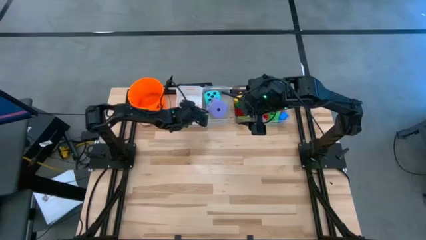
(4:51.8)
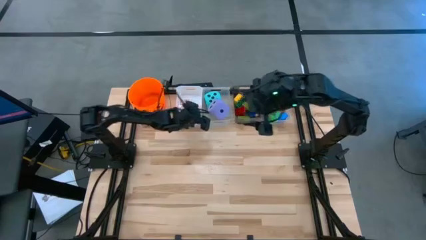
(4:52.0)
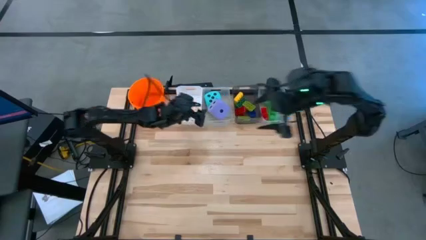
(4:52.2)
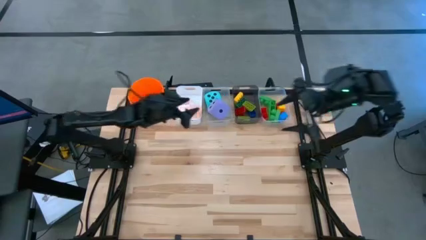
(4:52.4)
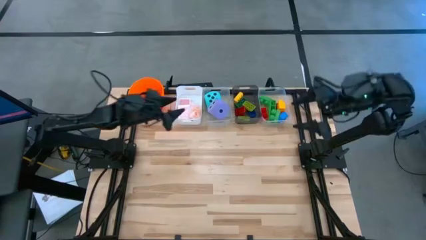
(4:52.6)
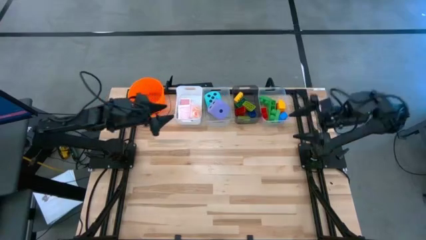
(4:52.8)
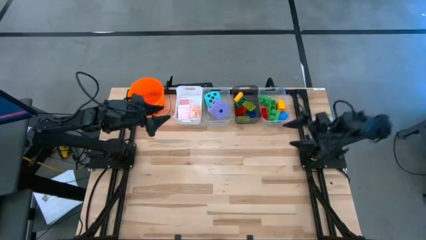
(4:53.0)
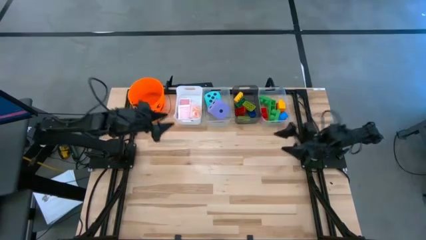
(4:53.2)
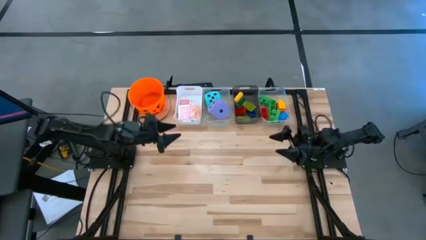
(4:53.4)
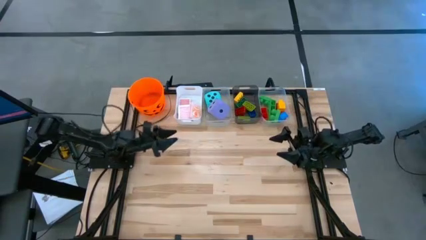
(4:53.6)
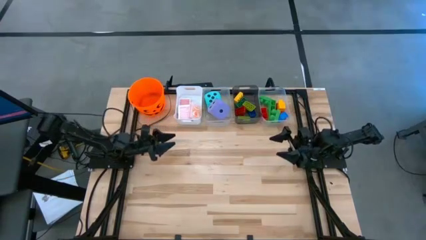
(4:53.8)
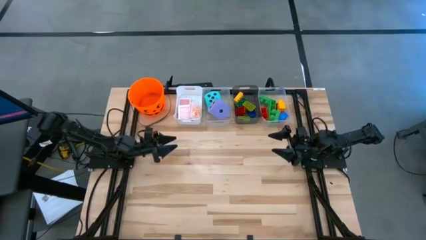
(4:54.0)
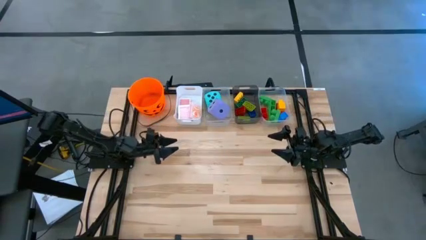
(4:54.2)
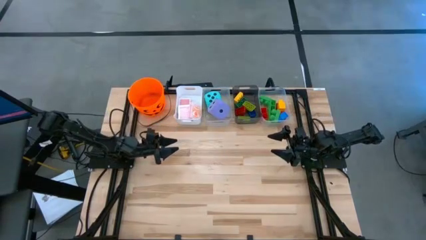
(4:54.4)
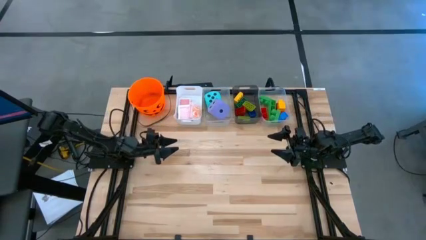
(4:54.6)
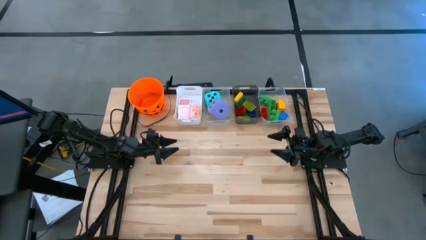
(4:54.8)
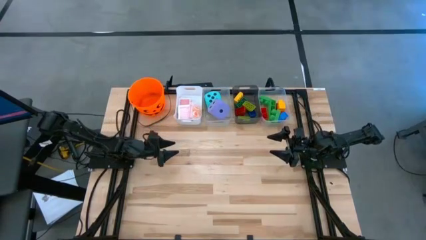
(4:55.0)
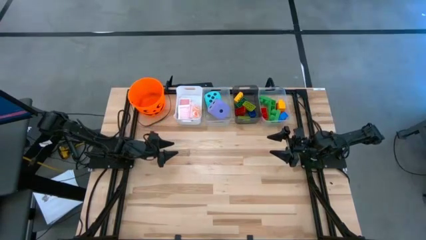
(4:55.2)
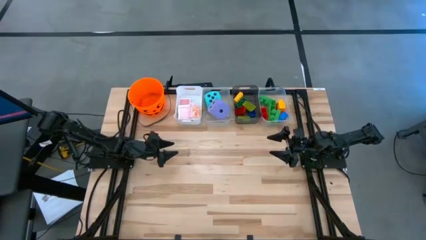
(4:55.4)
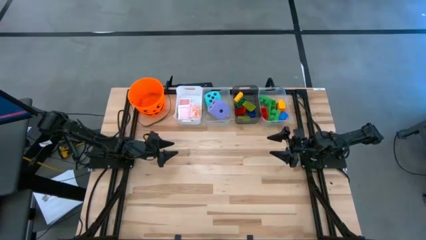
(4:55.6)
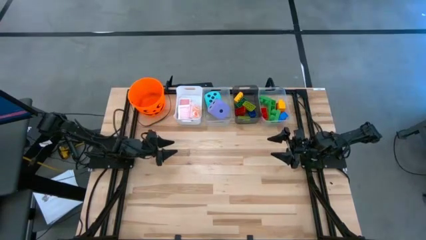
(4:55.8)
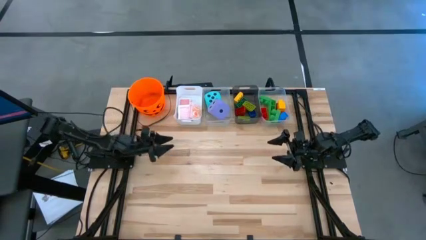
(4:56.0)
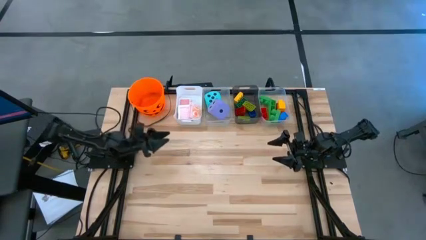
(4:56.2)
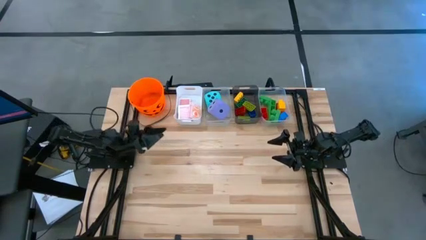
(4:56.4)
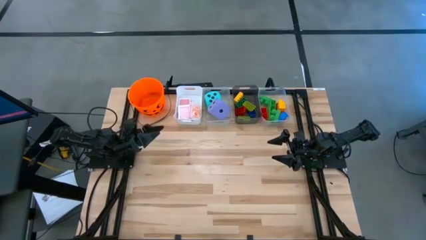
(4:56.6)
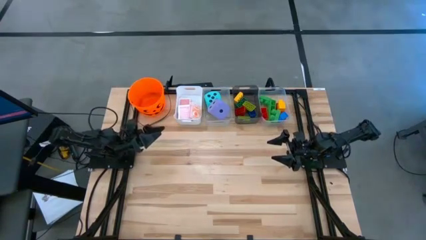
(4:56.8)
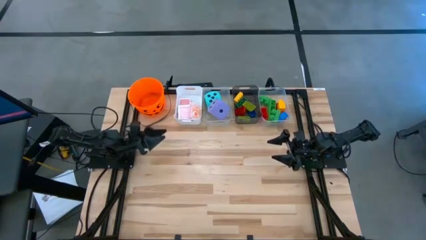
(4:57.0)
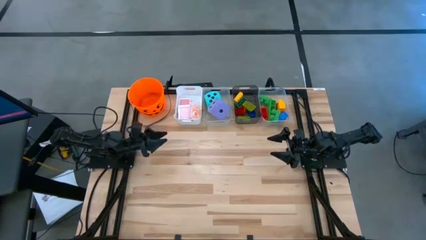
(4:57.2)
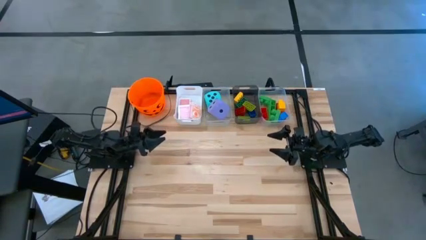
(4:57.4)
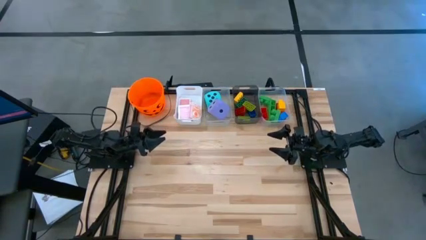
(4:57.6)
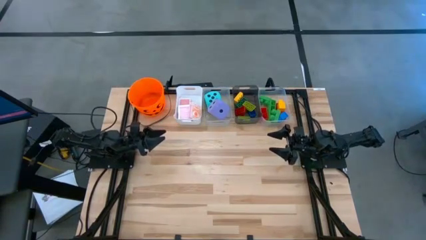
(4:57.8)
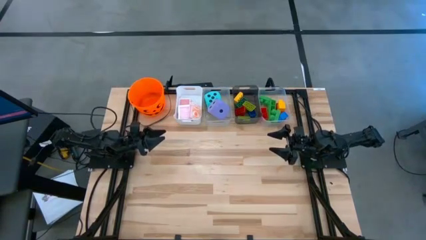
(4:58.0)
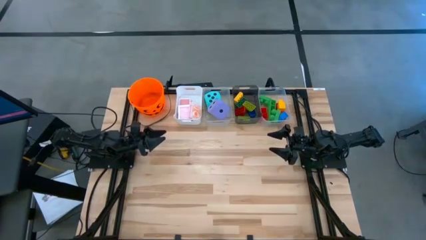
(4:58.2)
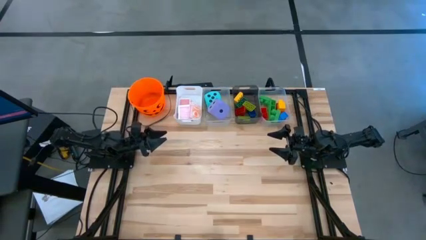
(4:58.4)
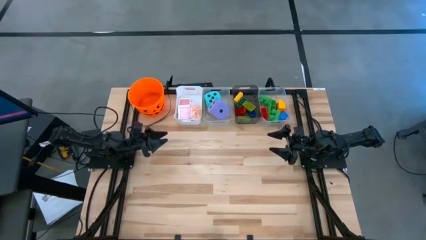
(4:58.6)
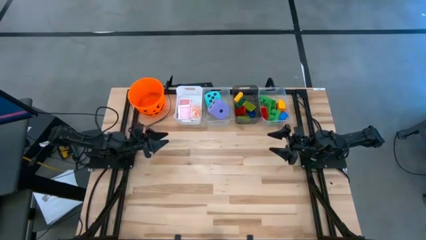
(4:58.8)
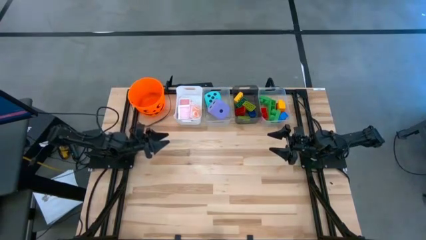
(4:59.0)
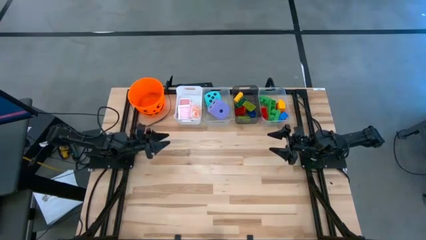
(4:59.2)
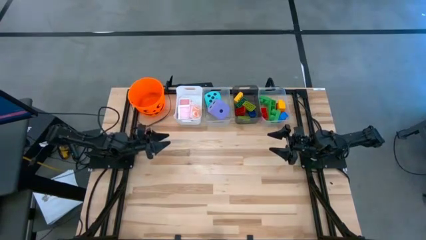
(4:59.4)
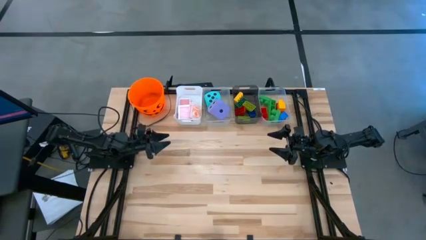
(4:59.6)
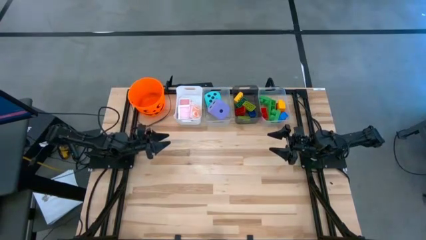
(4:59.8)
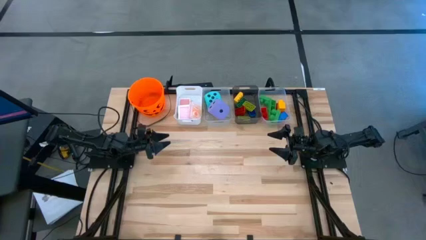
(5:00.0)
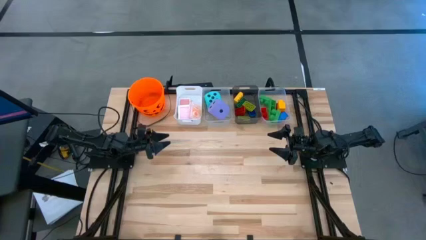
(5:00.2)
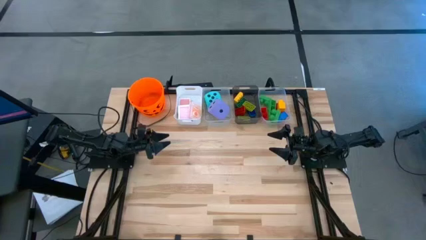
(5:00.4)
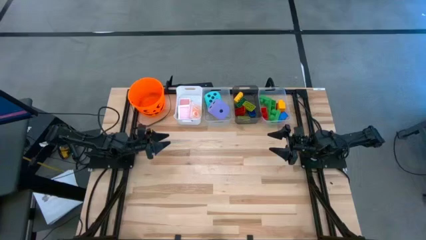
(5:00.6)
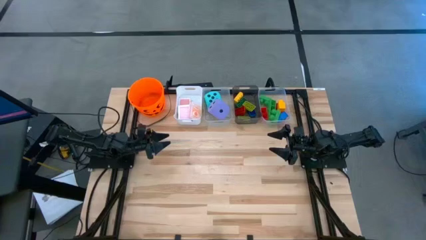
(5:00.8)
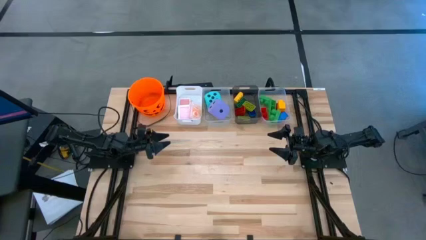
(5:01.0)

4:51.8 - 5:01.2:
Task: Pick & Place Toys
Return to Home Position

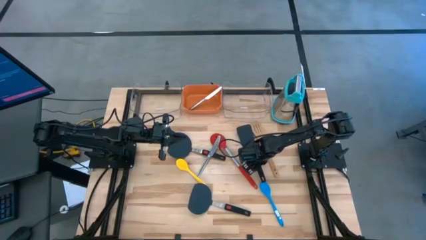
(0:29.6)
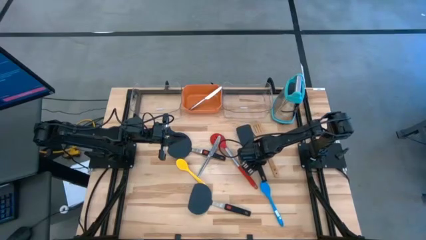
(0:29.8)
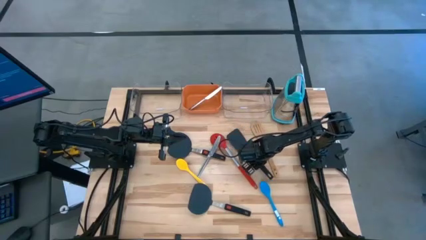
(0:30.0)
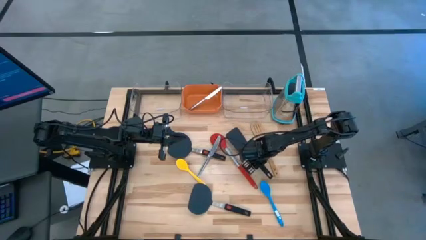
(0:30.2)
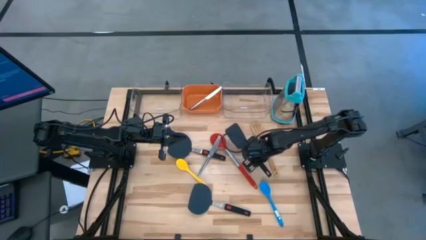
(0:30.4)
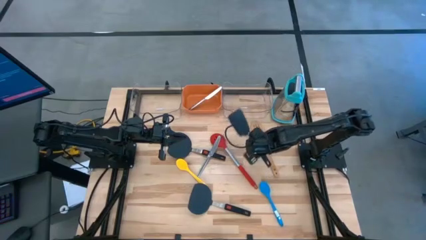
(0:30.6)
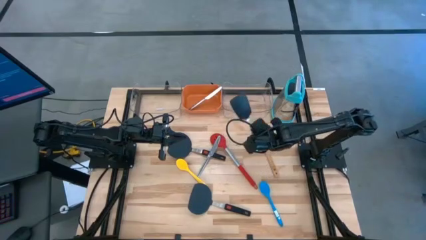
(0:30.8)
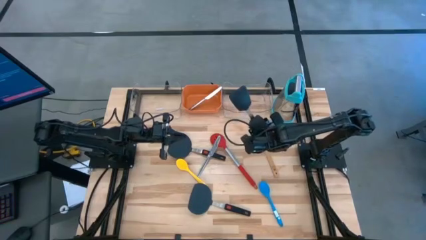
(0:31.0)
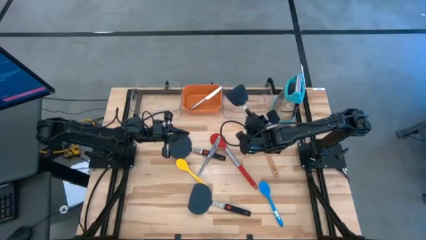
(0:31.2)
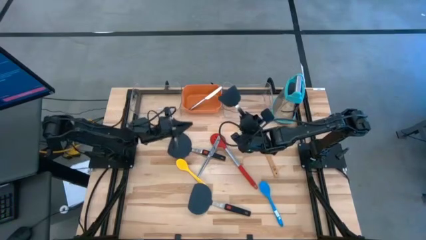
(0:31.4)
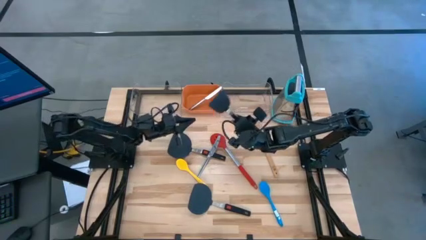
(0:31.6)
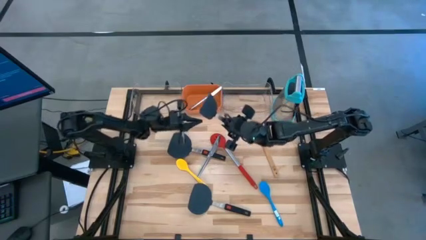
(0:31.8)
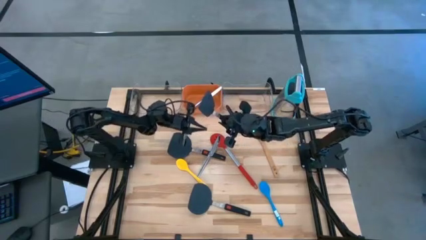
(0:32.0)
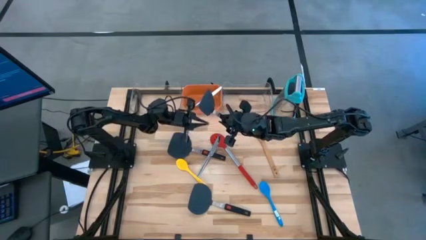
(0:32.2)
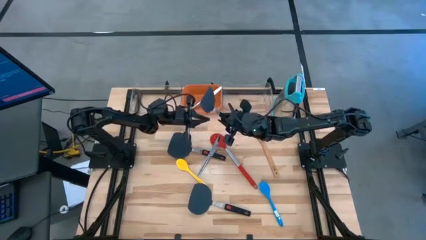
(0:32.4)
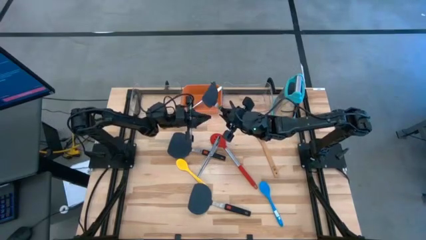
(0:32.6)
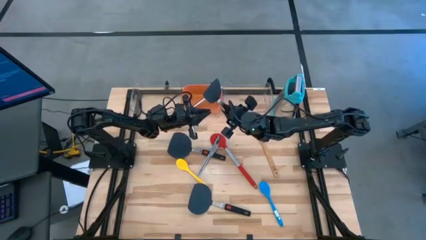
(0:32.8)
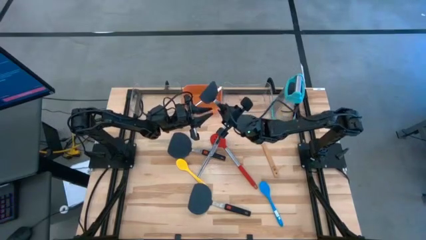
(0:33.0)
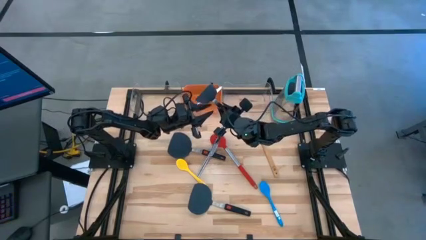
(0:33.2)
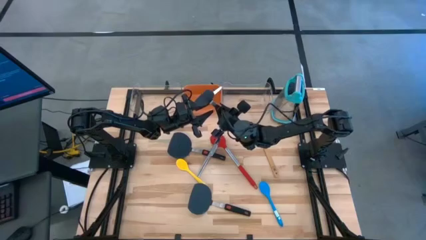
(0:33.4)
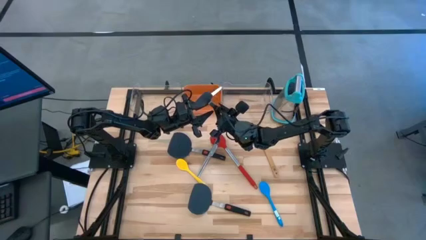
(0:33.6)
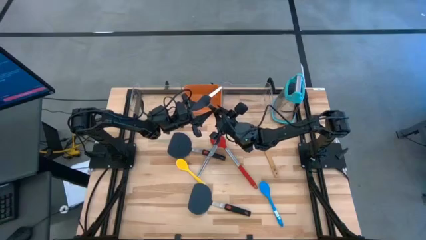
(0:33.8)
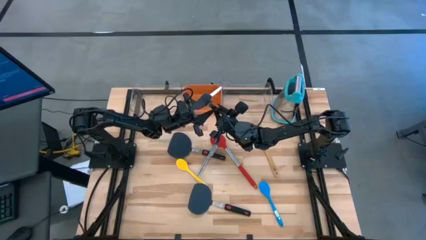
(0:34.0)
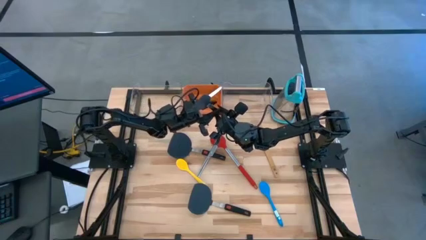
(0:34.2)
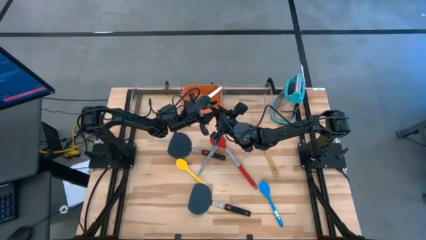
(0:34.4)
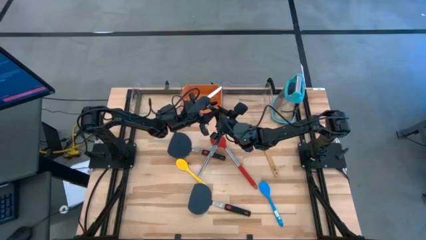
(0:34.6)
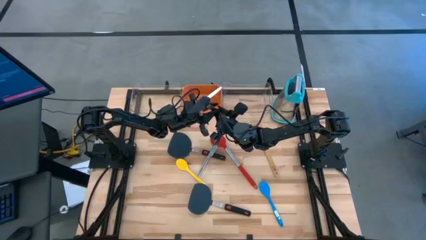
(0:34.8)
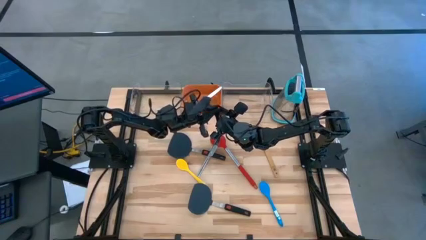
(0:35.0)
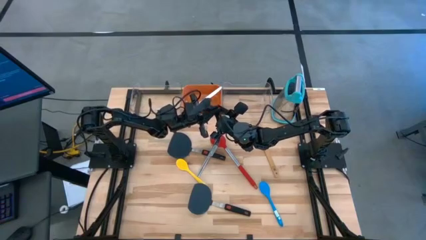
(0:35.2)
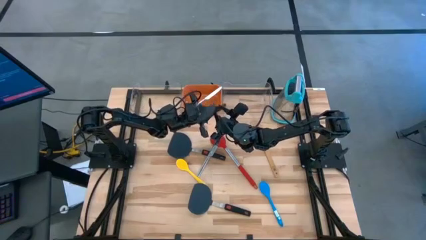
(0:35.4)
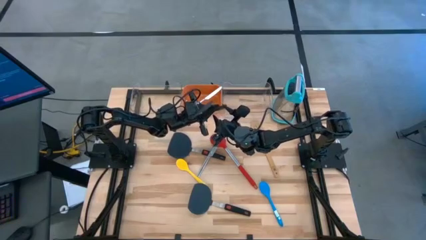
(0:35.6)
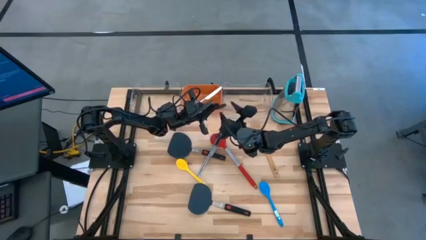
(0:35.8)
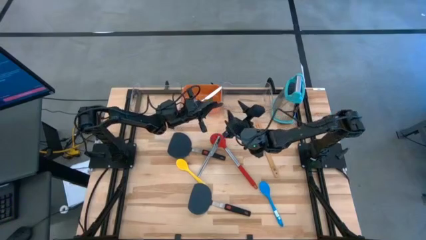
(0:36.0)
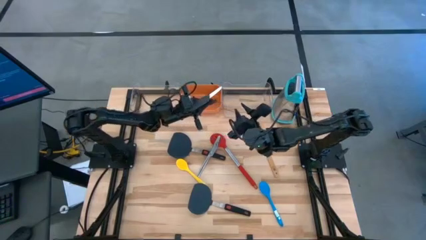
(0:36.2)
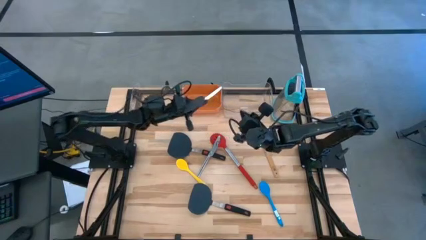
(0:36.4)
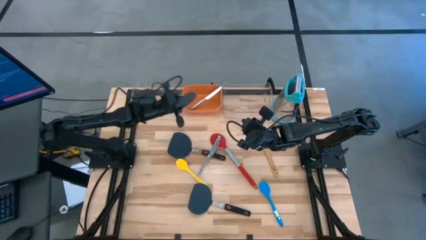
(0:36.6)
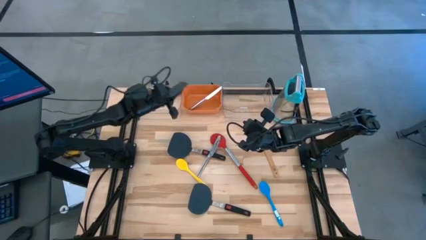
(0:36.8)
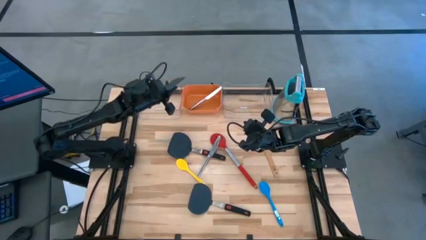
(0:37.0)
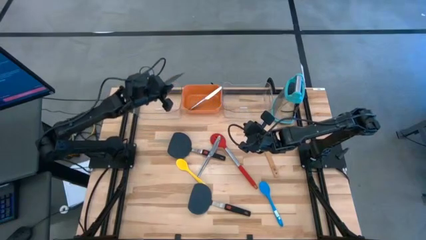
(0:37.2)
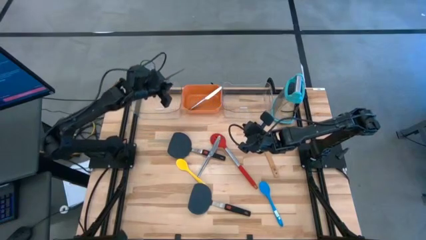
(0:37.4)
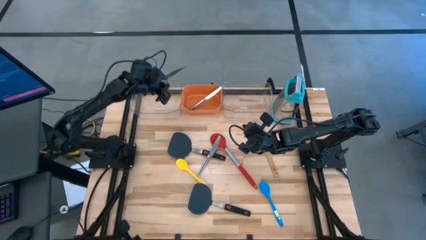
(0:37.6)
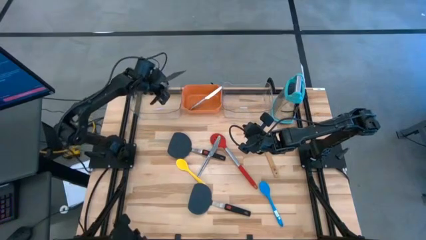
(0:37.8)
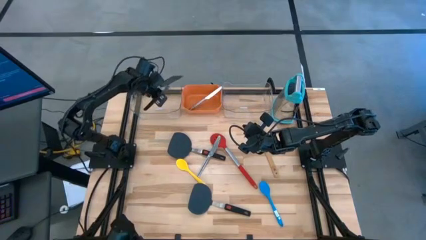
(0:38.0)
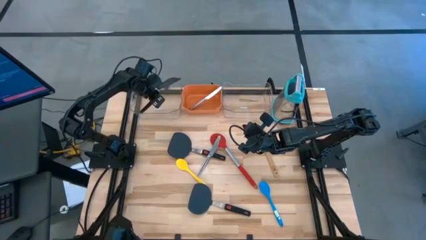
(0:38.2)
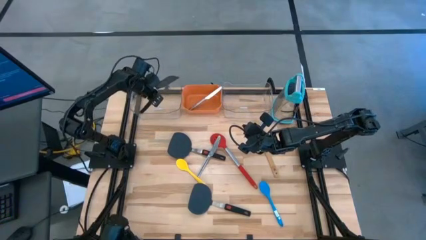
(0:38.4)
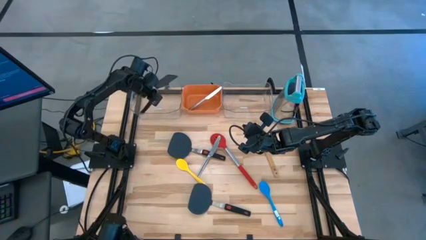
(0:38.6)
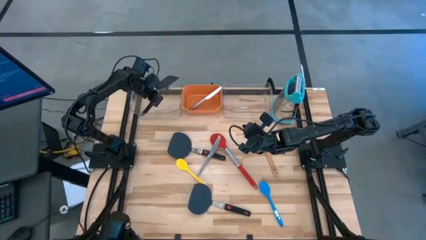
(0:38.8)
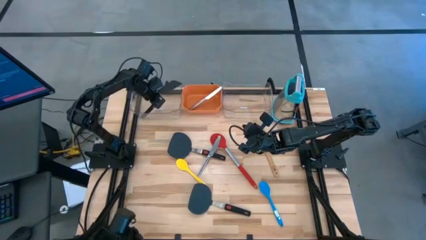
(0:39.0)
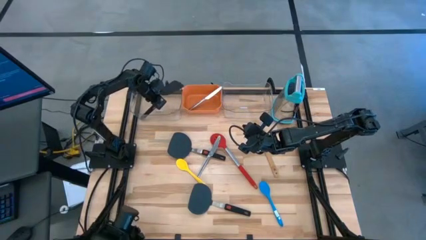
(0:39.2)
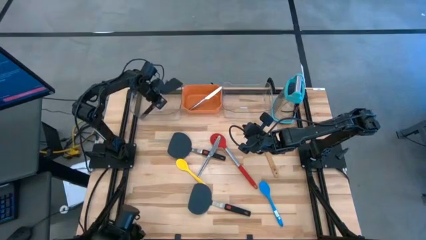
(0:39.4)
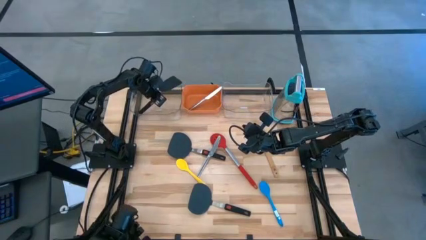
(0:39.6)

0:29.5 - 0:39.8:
Task: Pick & Place Kitchen Items
Put the black spatula into the left transparent bin
